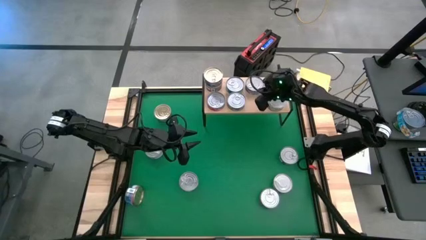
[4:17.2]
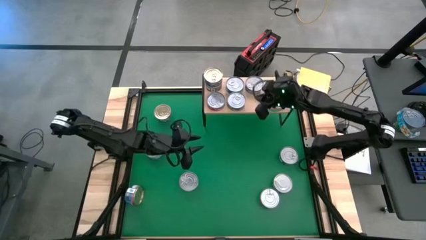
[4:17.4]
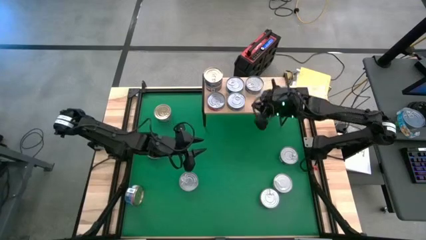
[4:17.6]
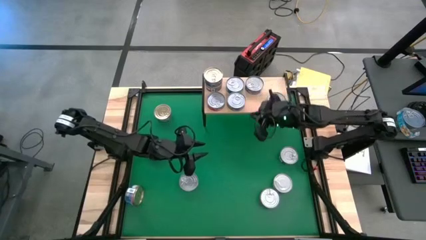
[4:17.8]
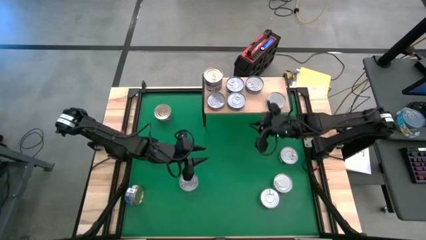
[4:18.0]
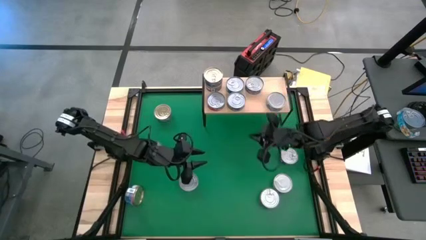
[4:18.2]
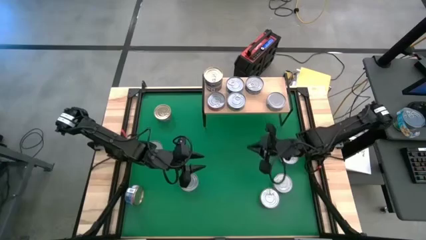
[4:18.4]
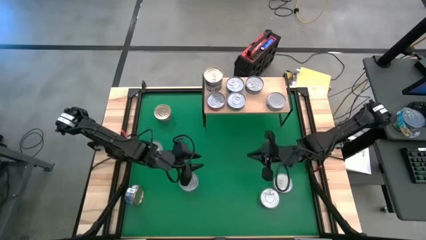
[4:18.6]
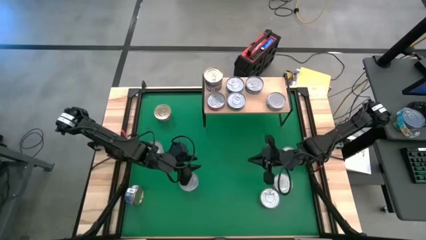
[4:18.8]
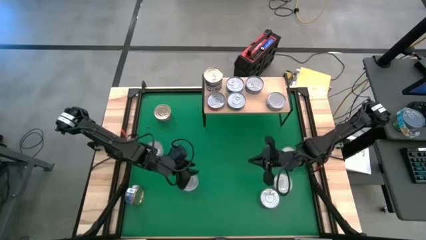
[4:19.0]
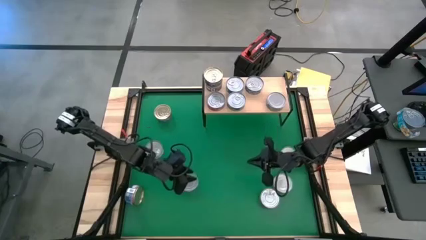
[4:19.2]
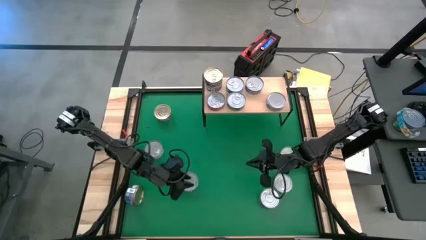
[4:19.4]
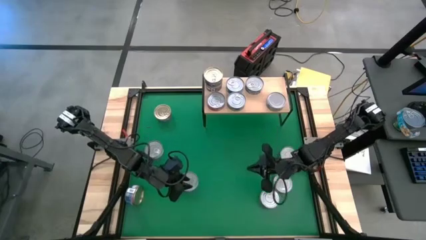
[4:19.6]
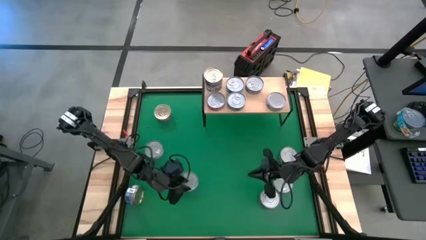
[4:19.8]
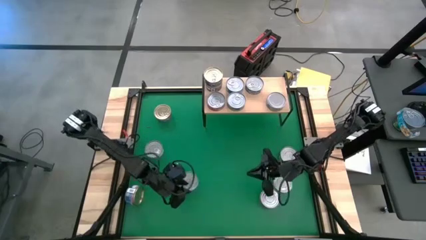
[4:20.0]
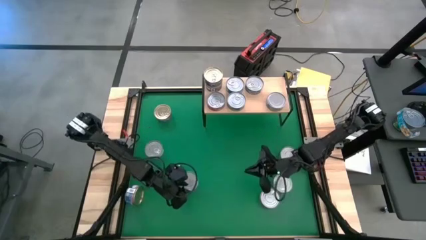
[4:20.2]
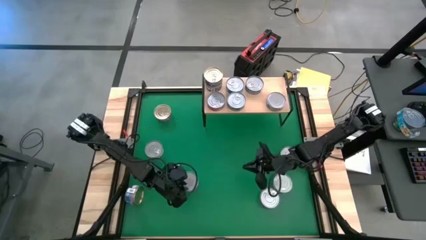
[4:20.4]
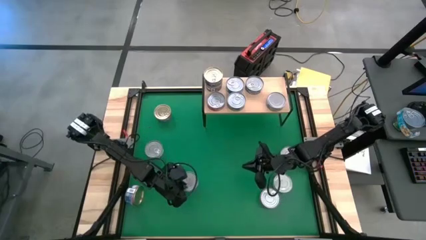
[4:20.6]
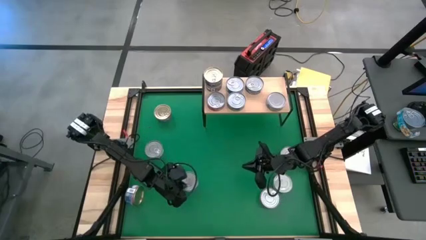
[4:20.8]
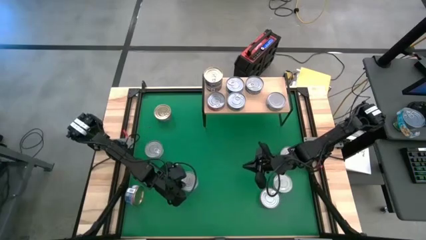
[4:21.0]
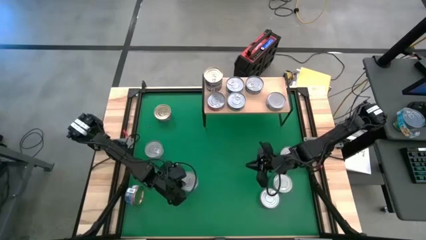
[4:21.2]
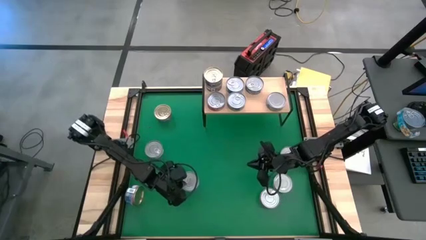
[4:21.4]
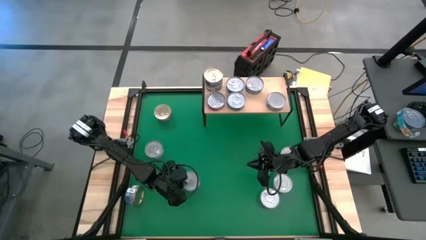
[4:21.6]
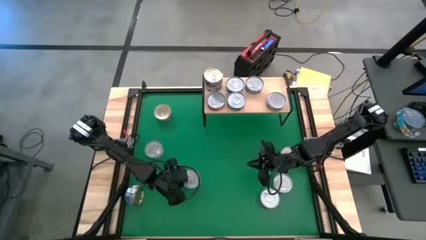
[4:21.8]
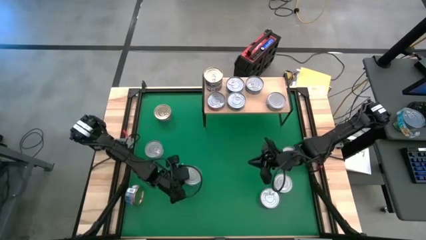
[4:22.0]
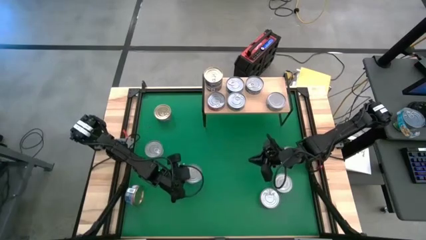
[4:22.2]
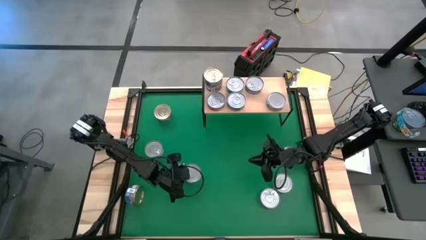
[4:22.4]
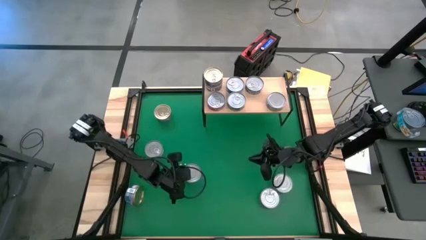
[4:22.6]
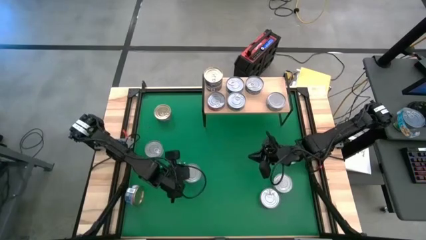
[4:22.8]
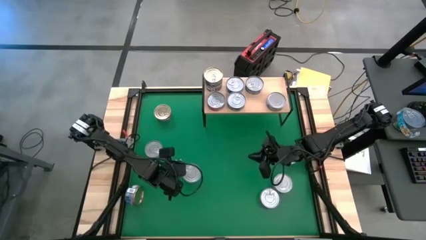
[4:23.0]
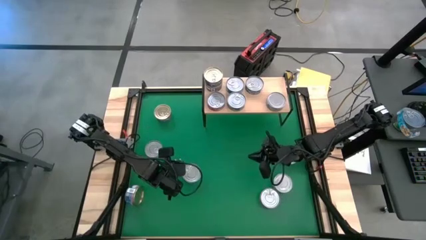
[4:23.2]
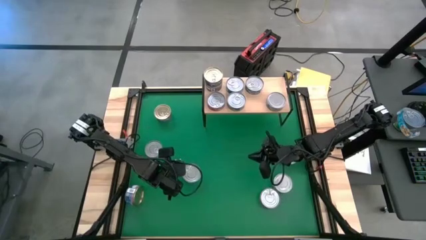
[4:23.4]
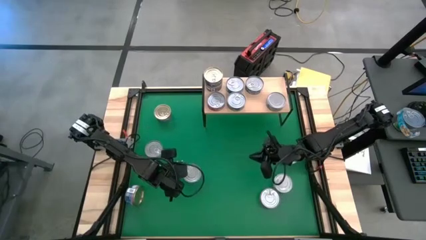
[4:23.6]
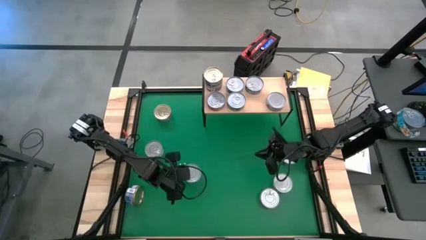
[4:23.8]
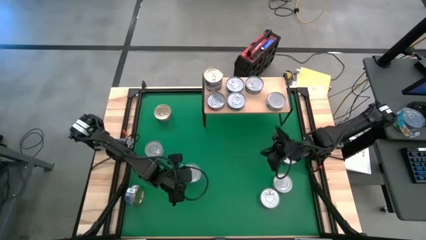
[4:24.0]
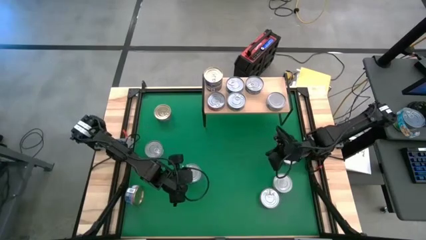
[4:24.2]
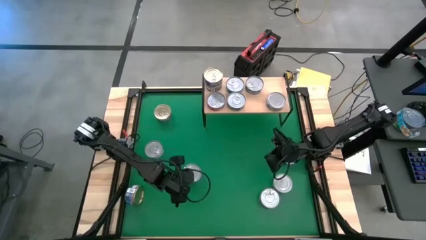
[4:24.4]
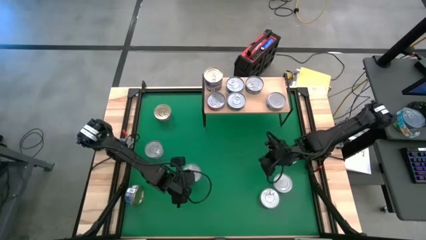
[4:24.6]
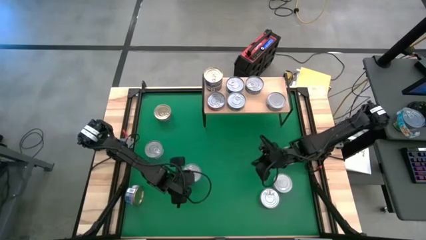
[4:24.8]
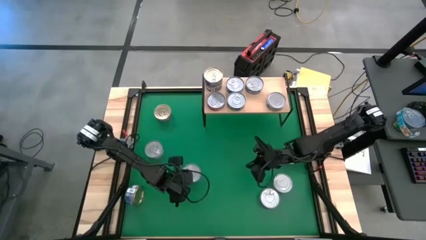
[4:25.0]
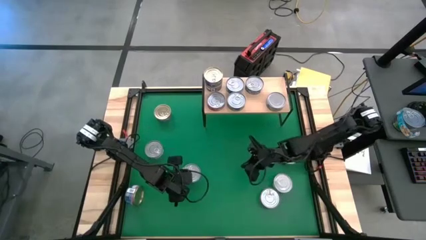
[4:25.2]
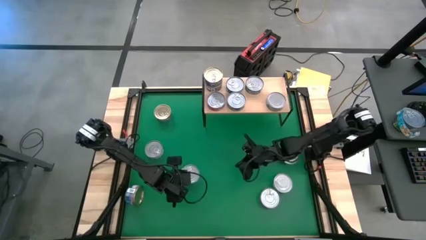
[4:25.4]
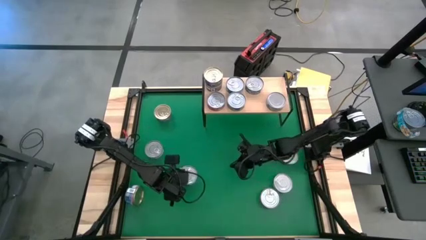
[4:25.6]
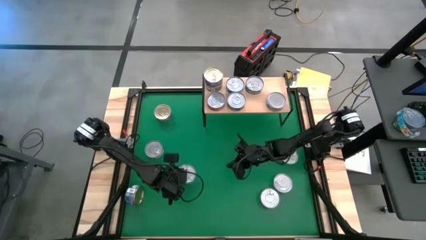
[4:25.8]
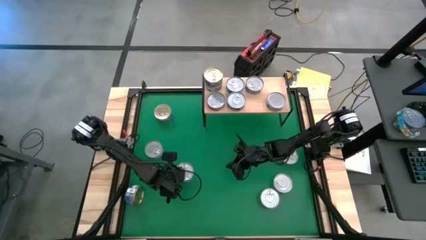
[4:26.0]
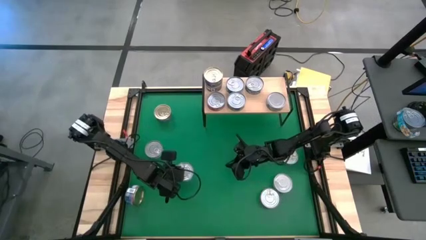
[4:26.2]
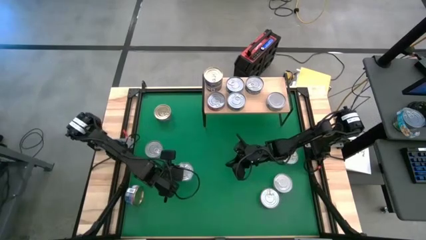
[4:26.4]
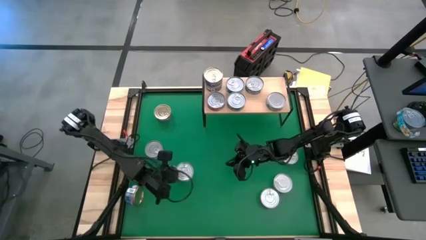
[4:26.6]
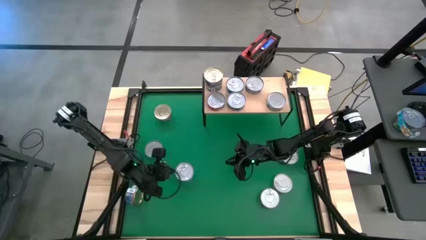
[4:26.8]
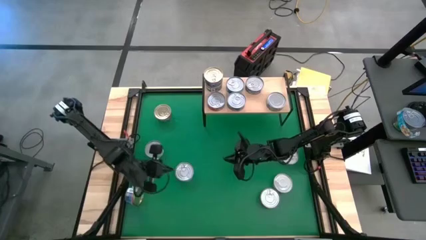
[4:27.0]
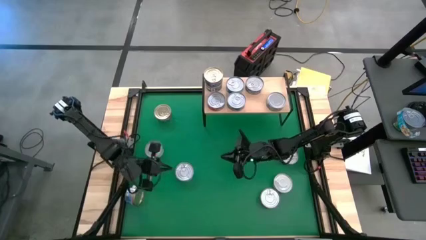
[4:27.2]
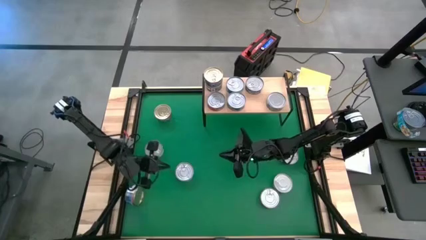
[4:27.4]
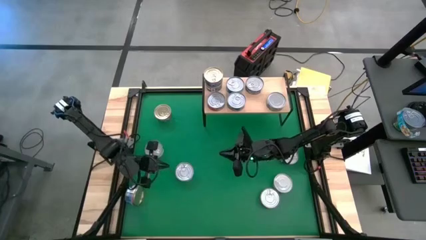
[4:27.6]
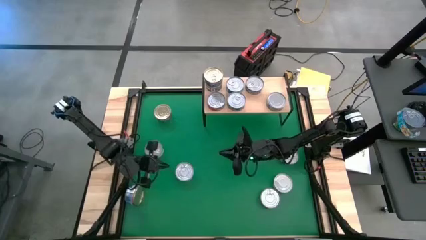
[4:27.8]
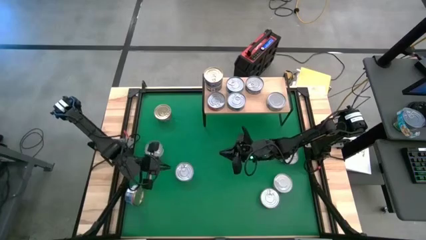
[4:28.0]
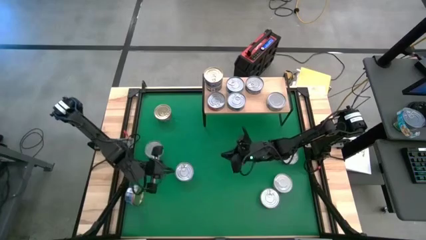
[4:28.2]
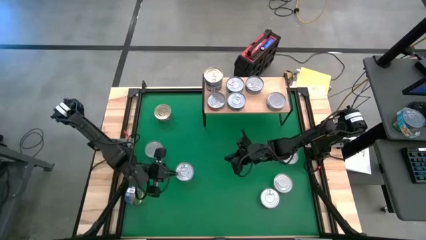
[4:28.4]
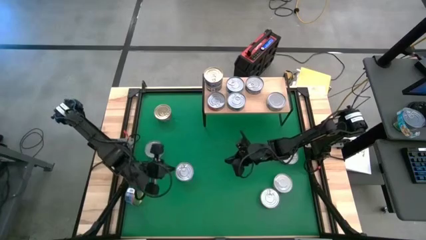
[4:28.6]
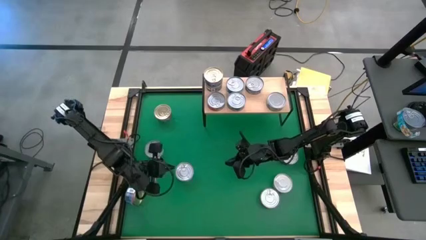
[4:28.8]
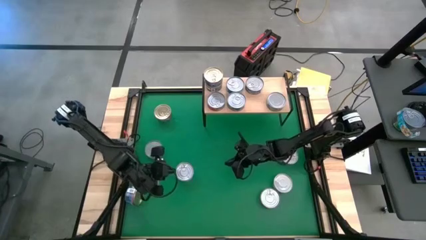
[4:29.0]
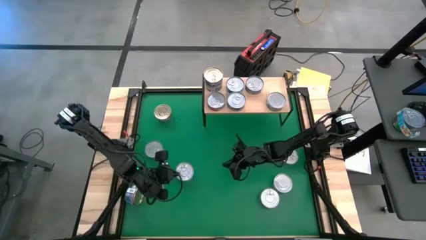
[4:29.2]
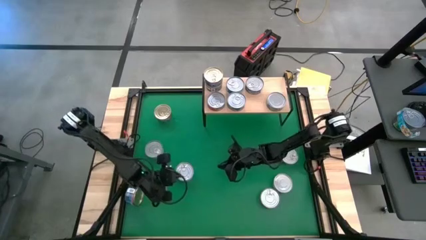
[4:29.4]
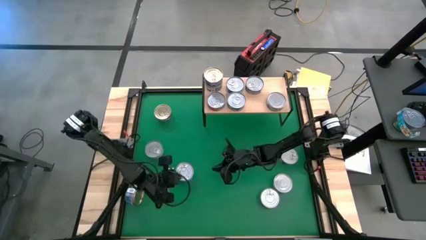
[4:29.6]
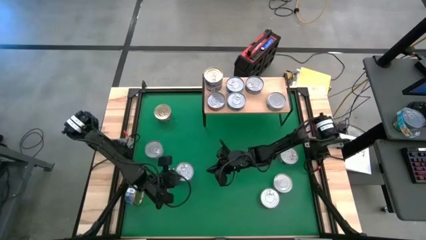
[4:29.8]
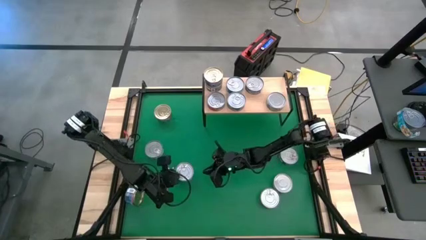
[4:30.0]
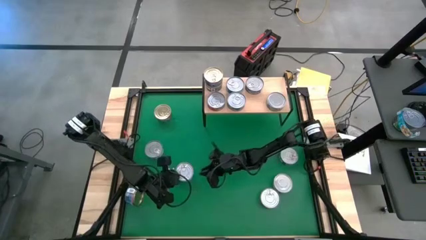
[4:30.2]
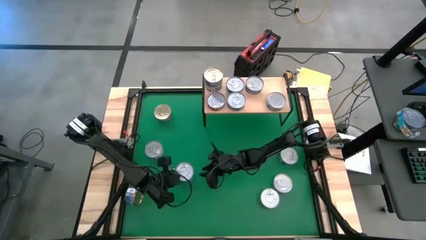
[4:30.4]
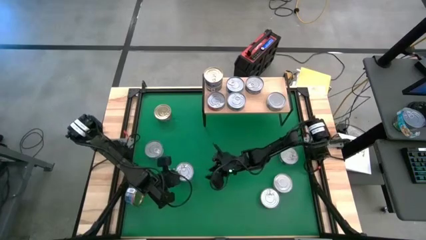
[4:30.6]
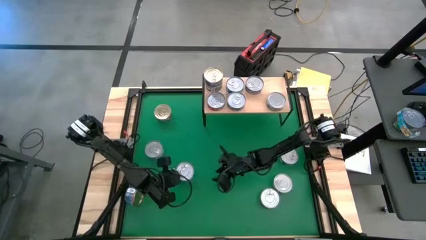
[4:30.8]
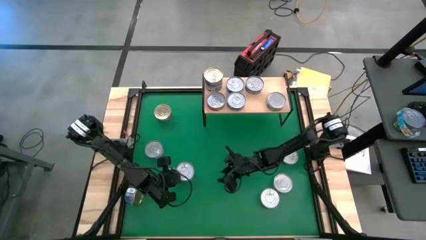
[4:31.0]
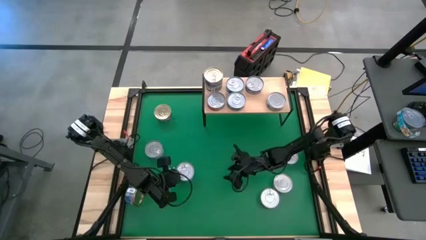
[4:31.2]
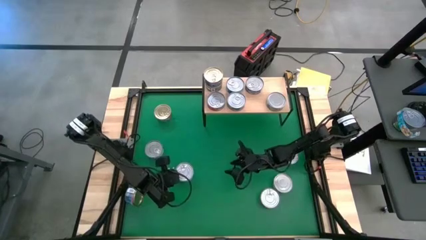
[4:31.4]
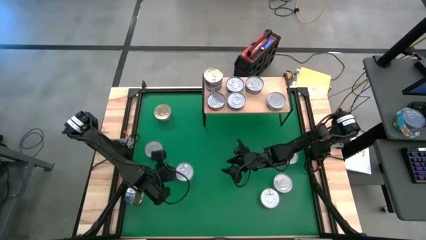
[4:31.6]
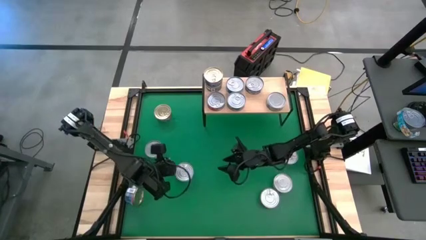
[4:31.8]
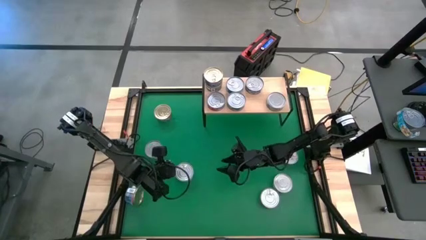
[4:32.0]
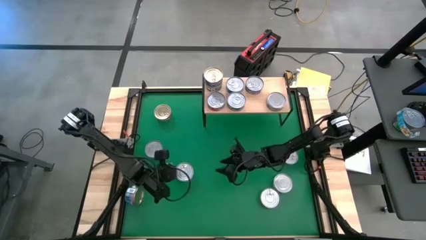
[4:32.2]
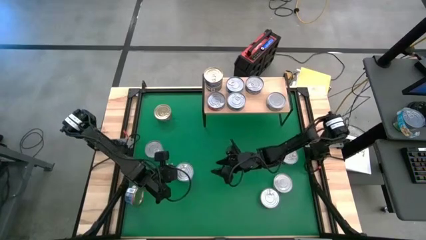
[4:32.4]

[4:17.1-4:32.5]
Task: Stack canned seafood by type on shelf
Put the yellow/blue tuna can on the shelf
